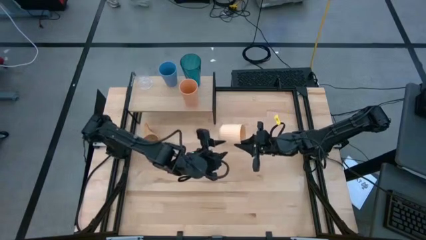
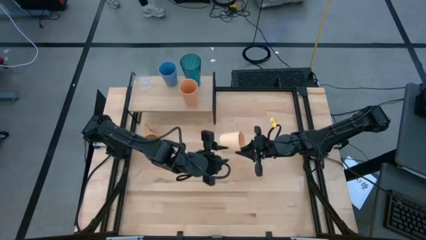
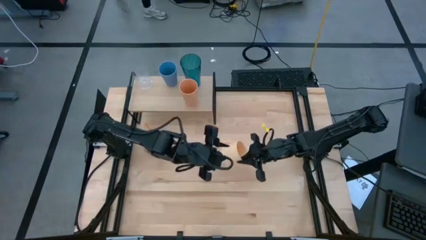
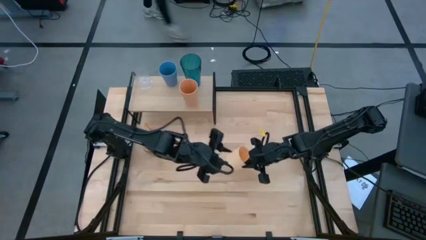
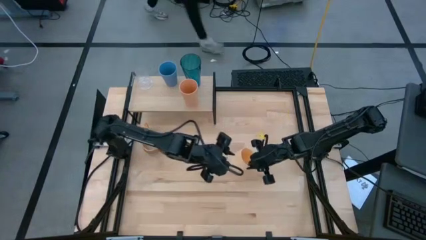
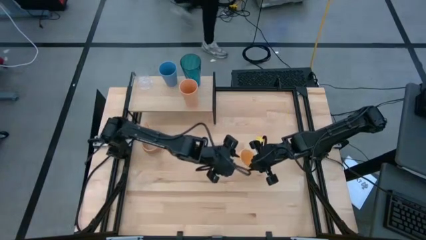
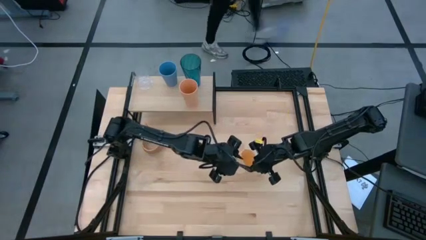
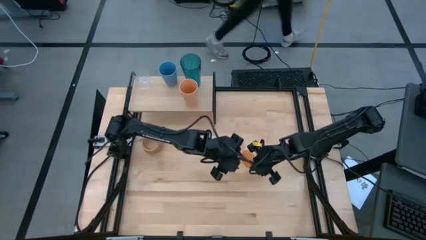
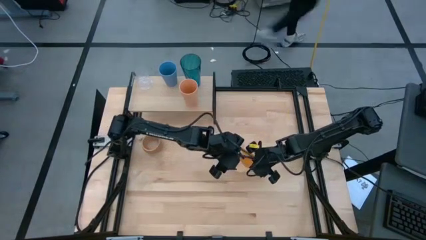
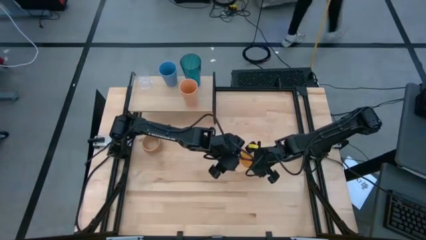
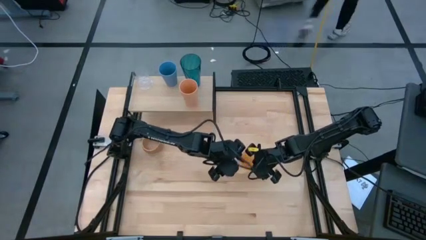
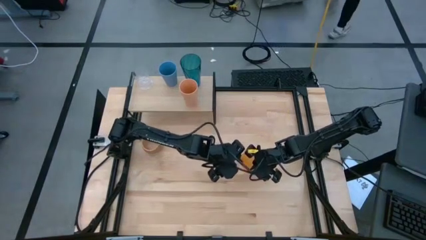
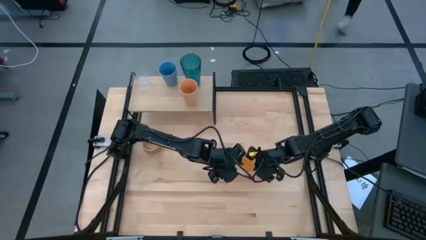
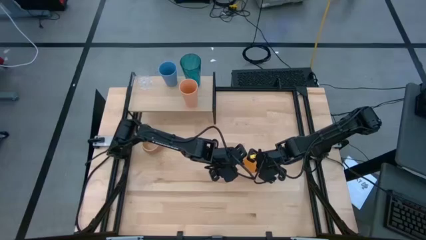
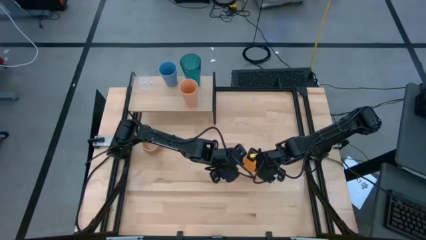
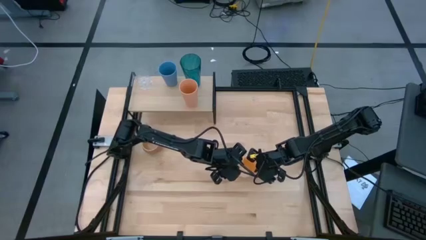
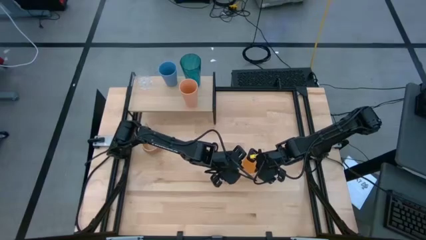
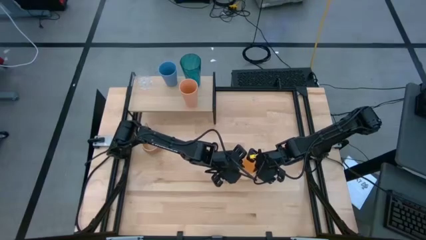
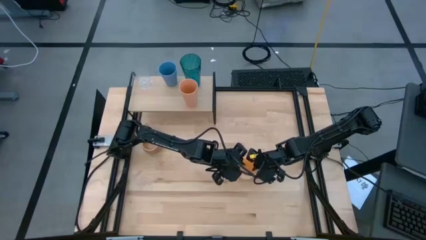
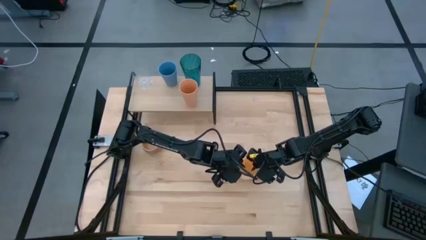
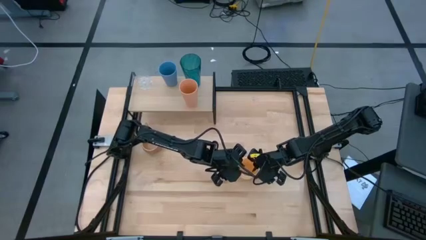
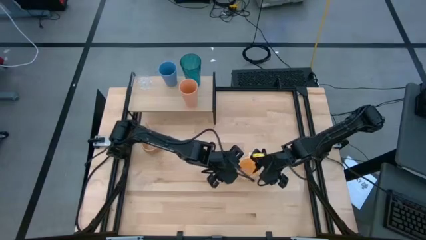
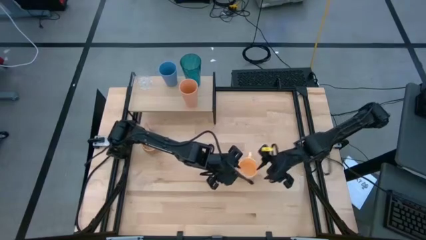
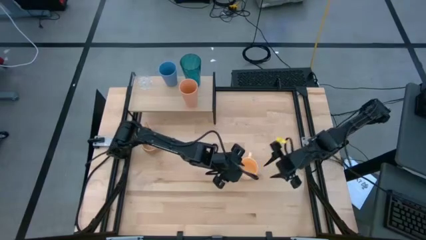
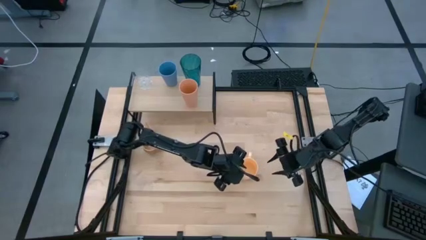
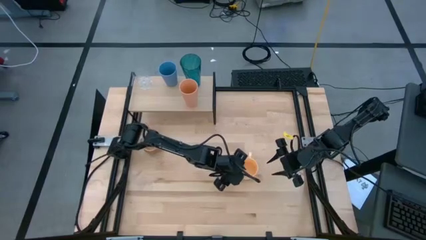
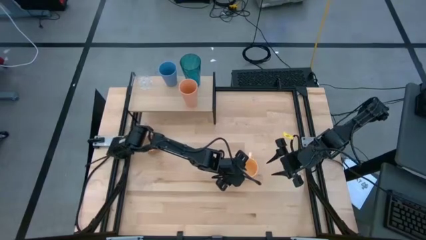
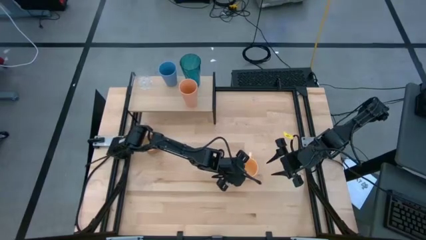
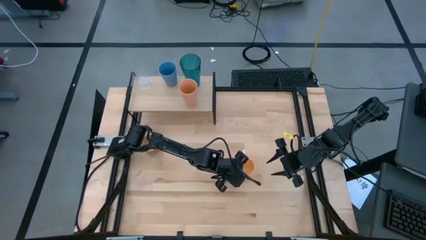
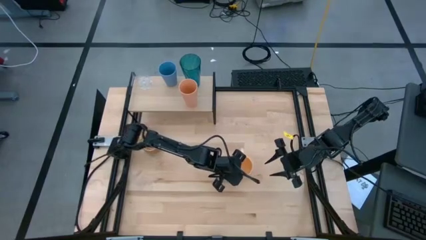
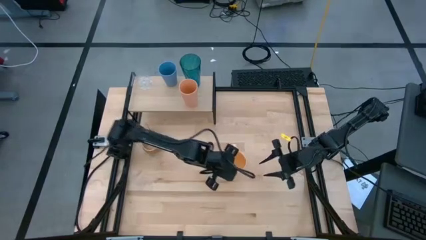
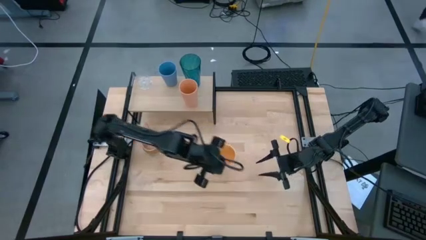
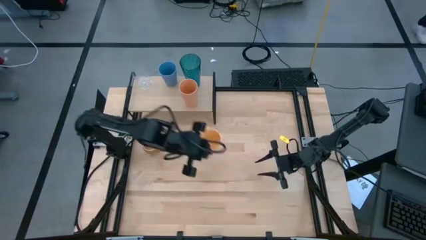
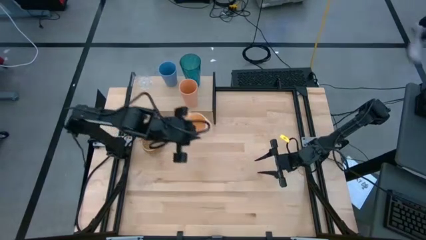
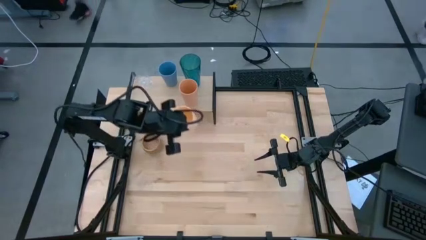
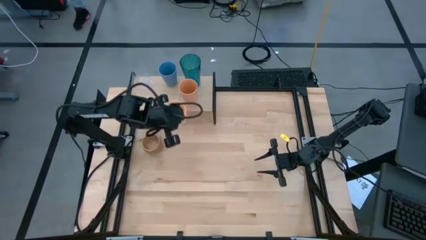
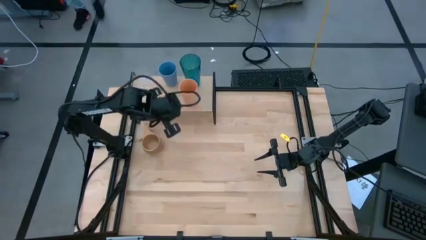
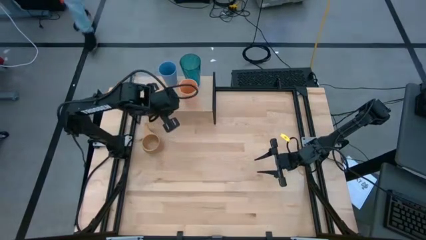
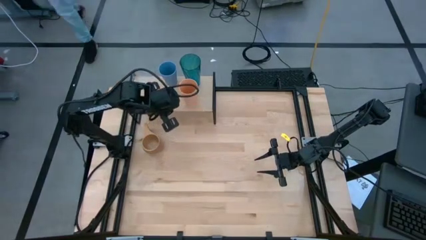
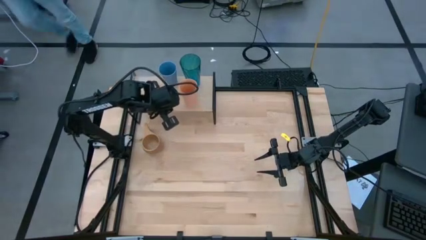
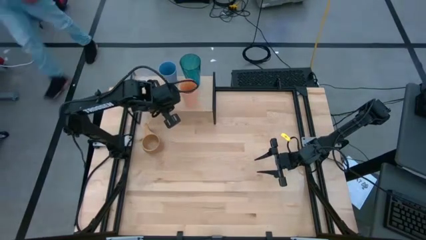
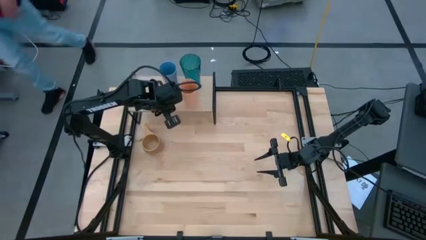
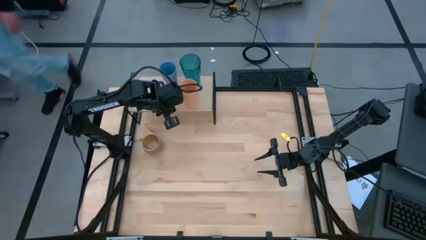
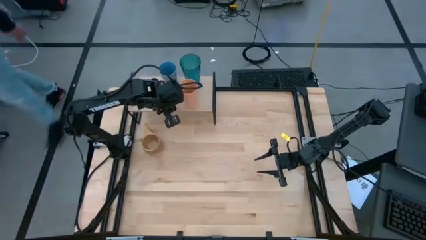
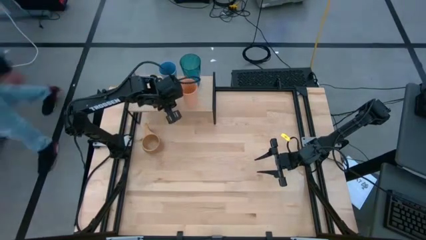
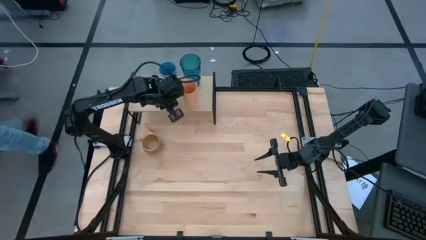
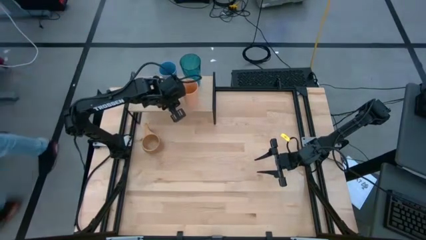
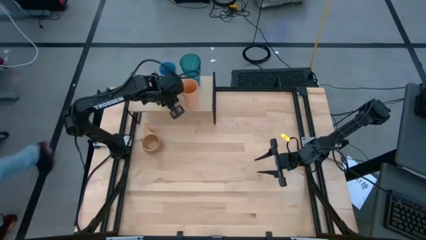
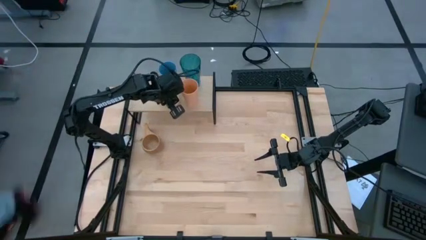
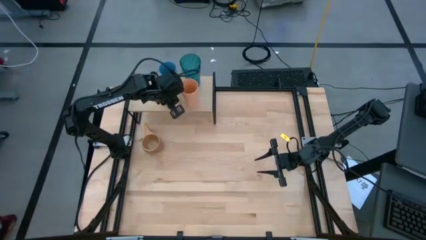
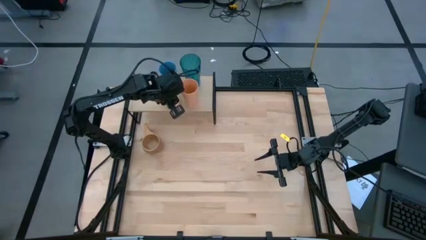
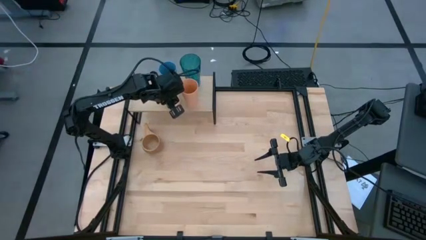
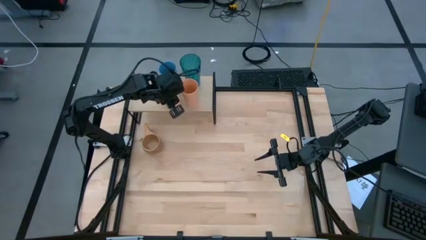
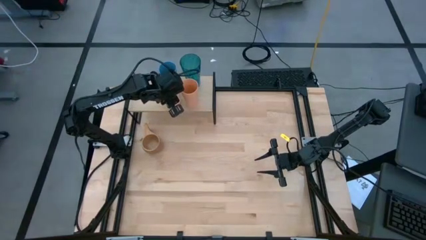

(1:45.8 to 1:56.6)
Task: Stack small to large cups/mugs on shelf
Put the orange mug on the shelf

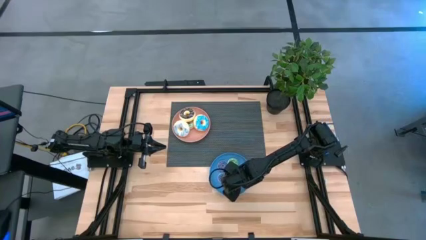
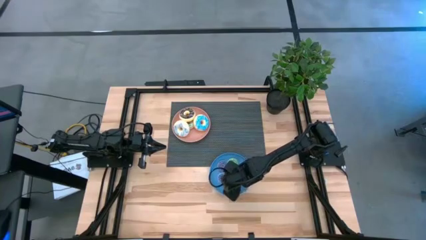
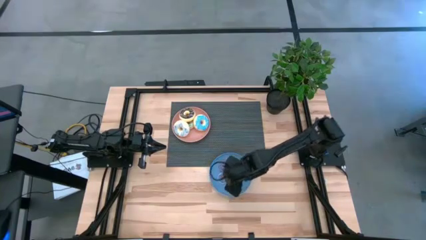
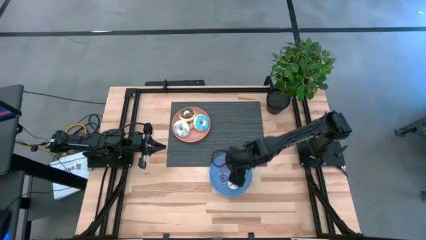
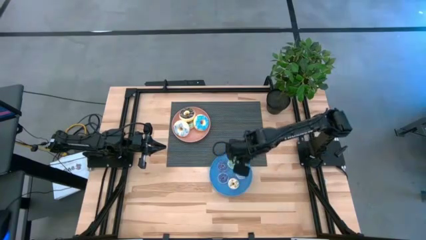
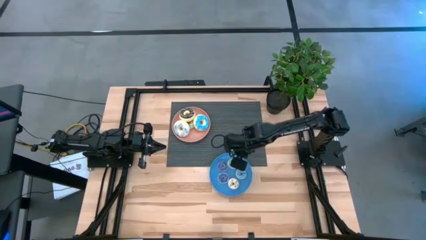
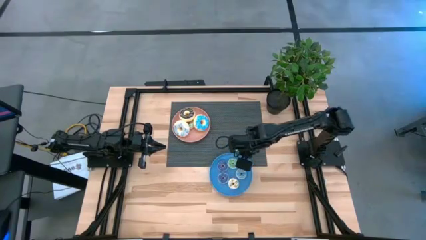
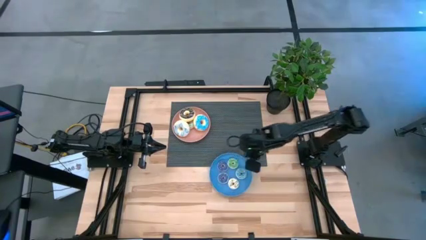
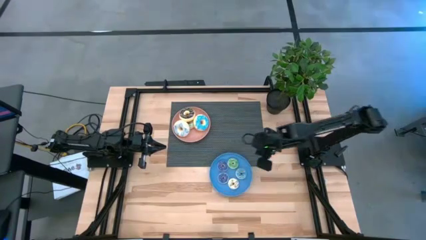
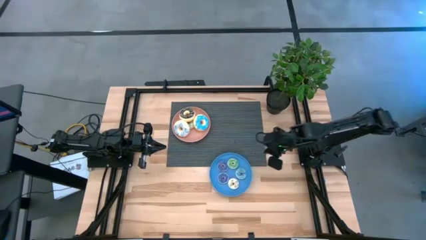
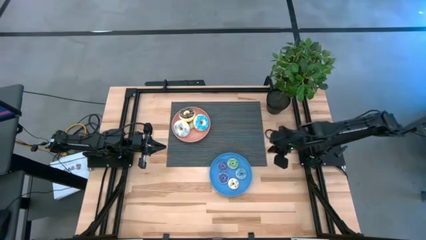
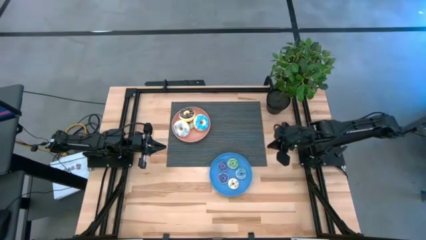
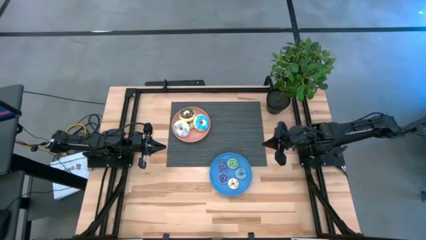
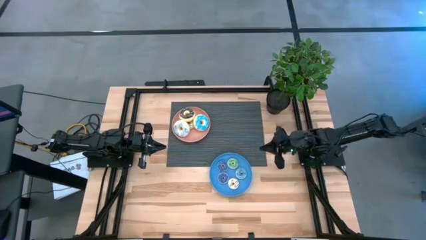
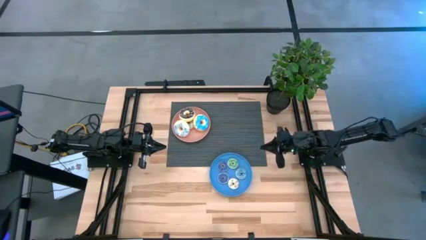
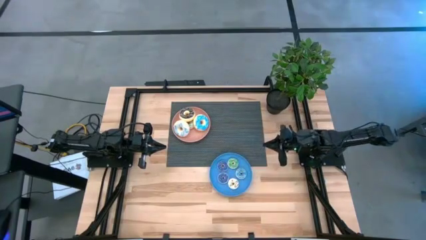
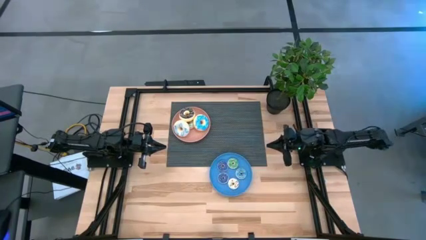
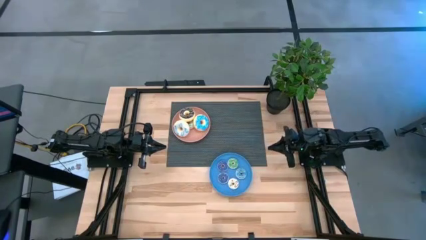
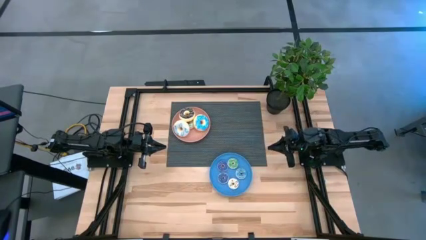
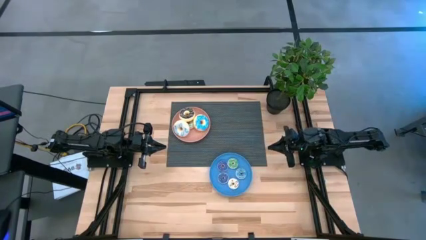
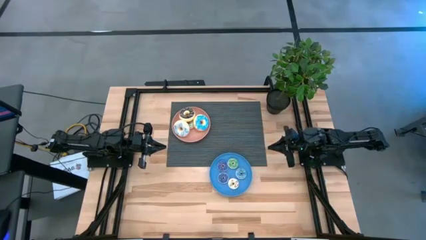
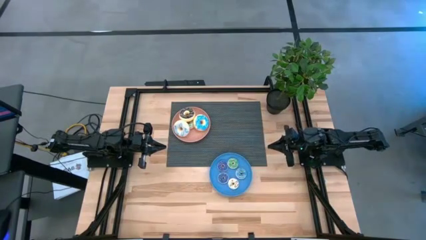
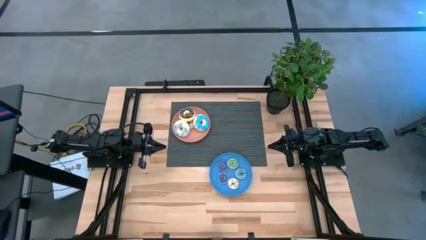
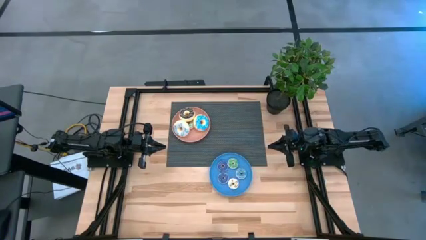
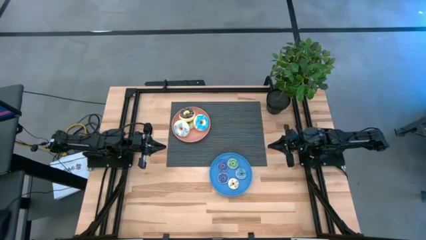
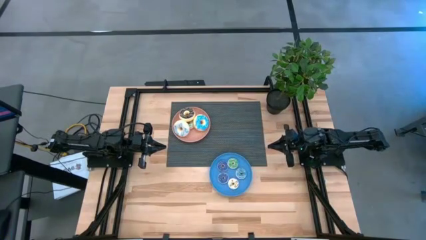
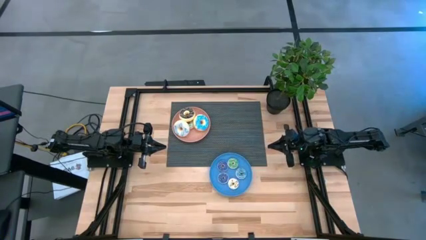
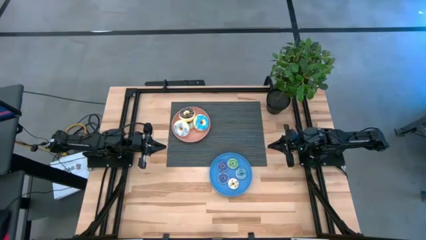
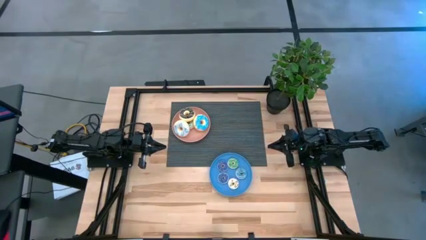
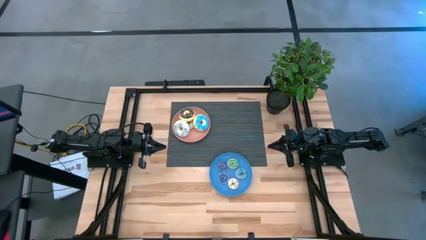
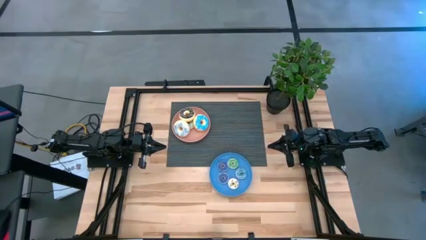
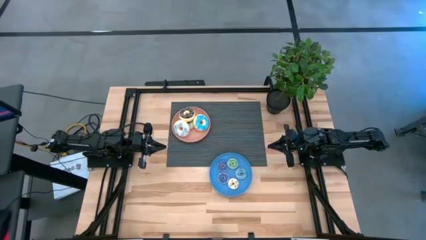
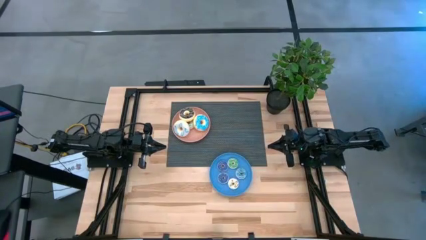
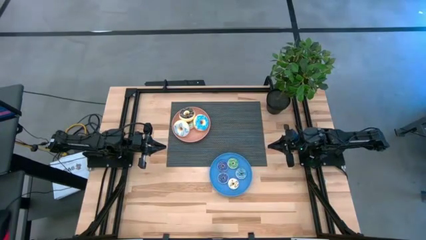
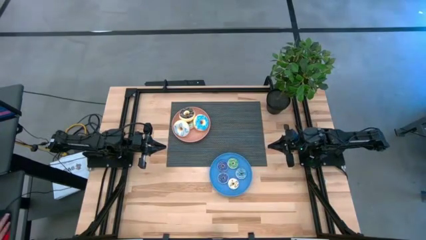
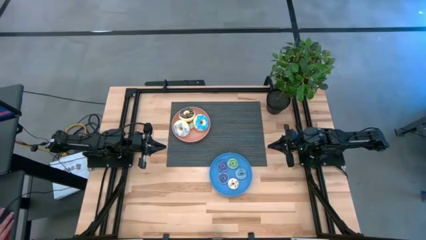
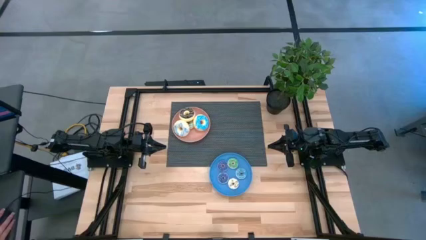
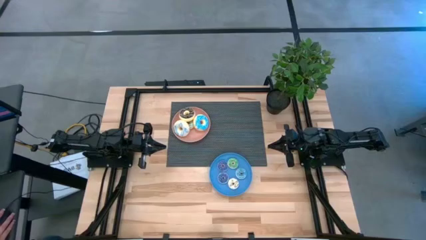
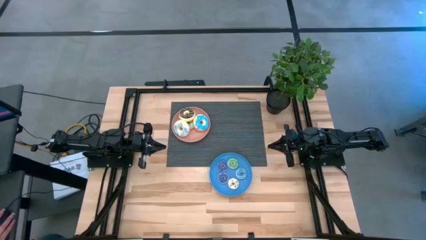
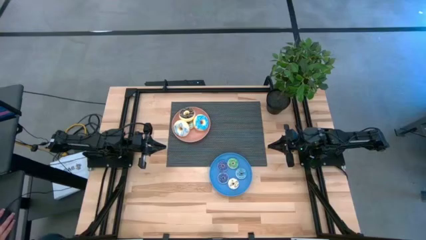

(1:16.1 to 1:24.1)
Task: Pick & Place donuts
Return to Home Position
